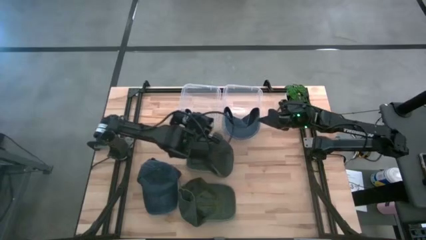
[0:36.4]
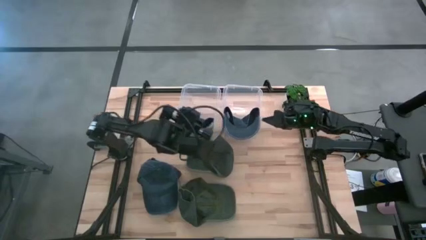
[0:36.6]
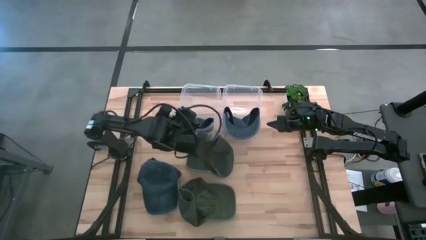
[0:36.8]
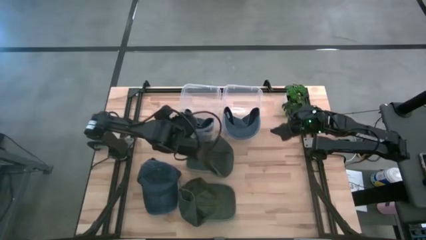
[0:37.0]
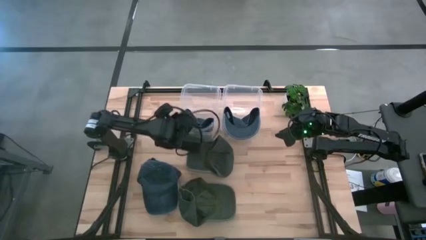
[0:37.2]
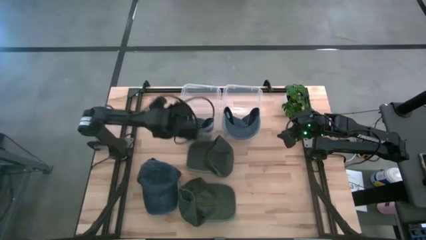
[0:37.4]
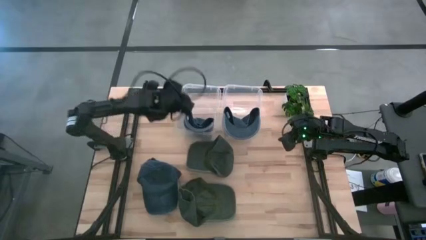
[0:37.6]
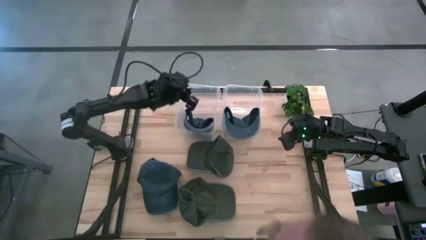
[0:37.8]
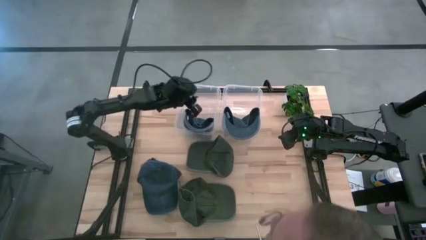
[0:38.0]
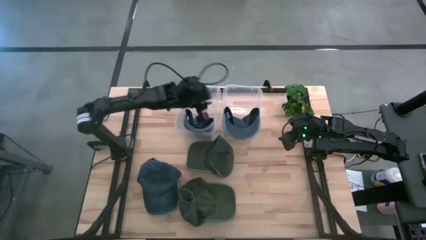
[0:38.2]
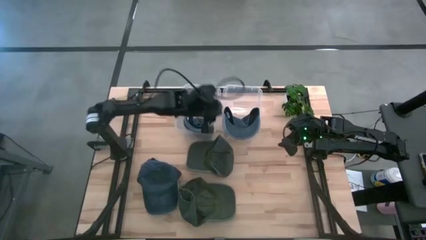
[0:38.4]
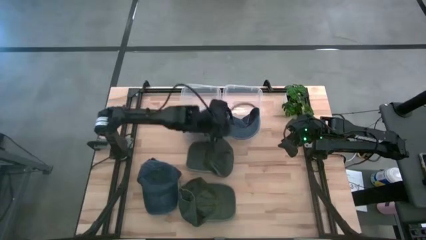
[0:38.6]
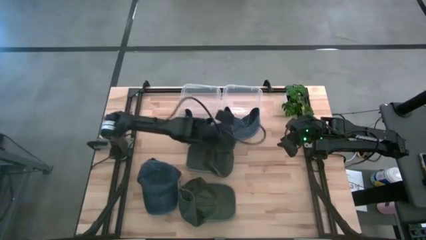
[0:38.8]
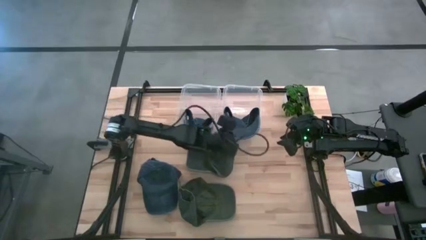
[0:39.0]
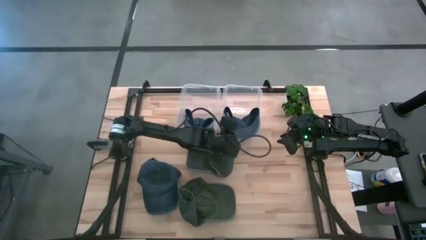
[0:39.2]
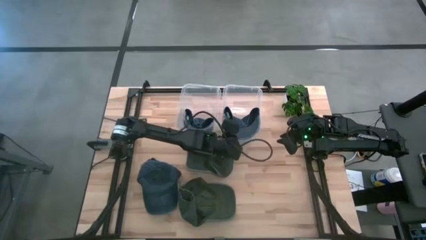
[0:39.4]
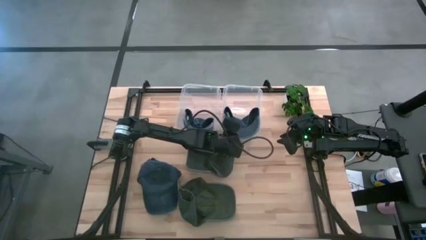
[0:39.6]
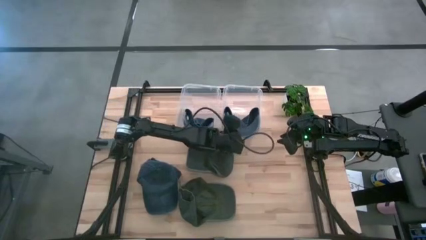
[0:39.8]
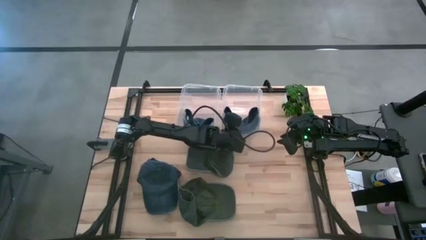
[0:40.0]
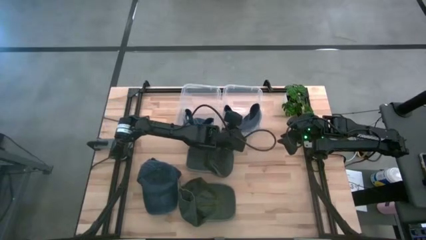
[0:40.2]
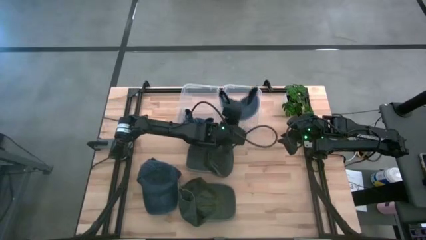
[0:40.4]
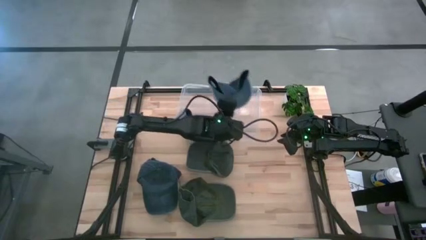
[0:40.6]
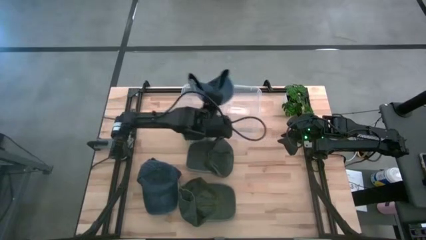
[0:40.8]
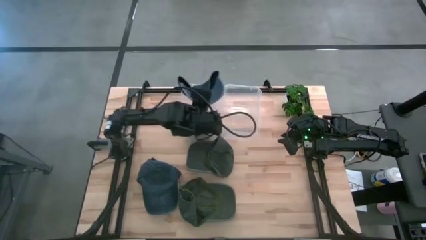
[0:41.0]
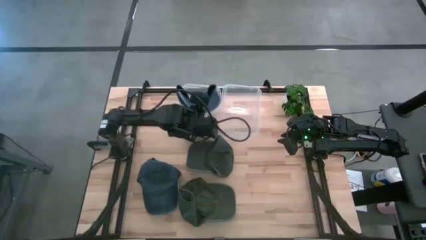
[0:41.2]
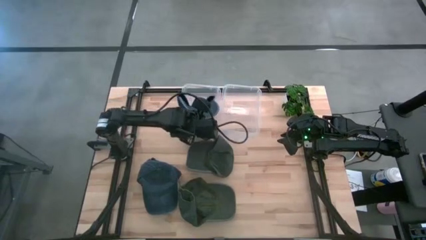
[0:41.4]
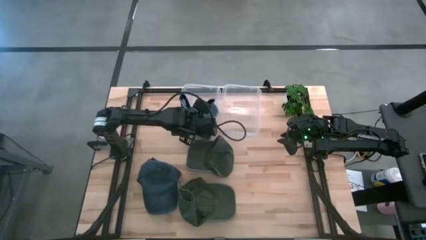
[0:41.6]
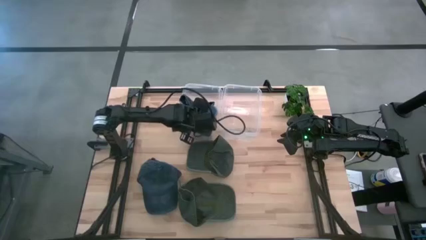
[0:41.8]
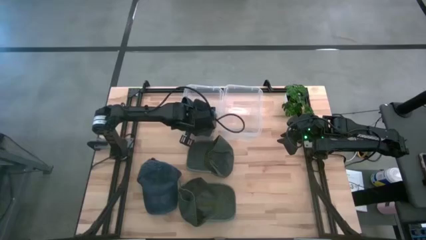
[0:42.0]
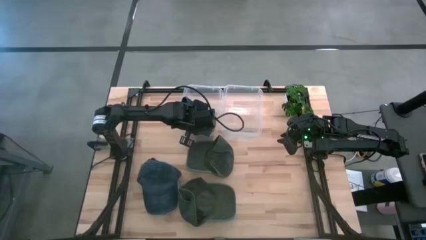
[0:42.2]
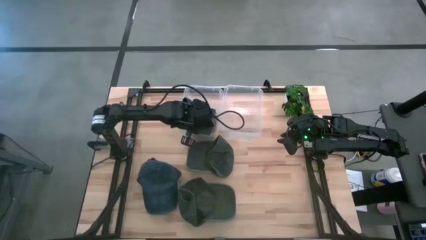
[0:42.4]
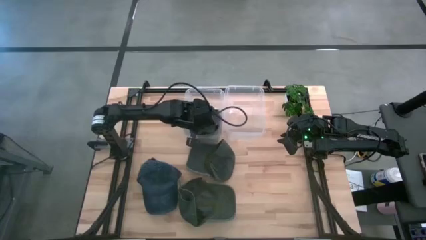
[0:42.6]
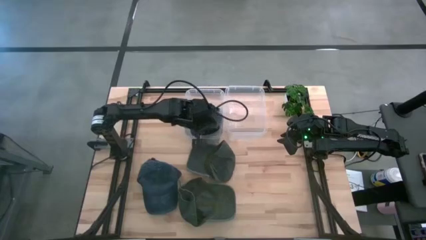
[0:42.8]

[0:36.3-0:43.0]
Task: Pick & Place hat
Put the right blue cap into the left transparent bin

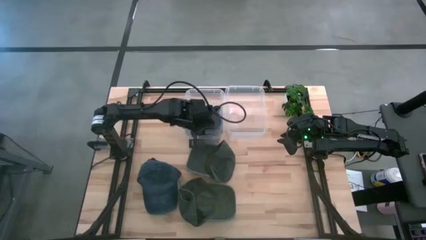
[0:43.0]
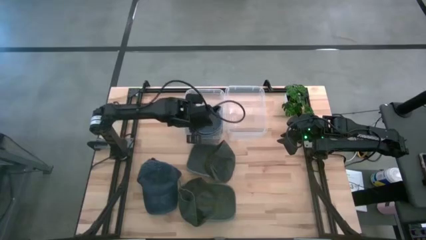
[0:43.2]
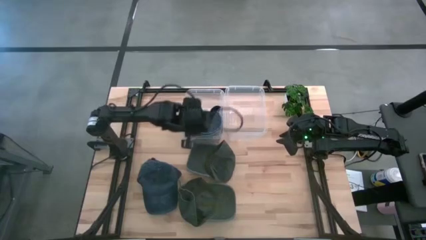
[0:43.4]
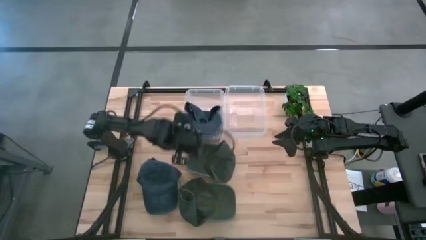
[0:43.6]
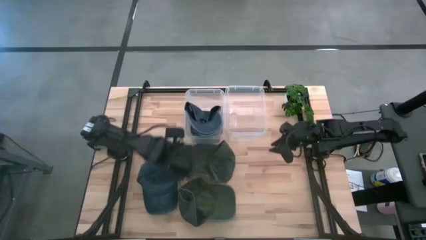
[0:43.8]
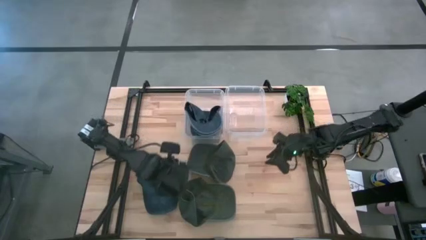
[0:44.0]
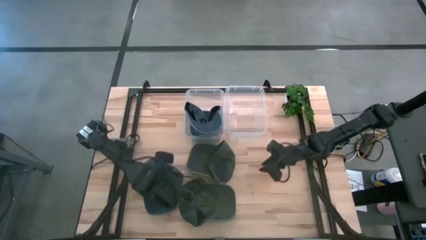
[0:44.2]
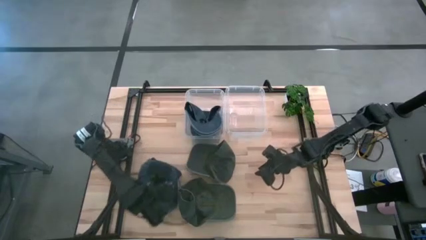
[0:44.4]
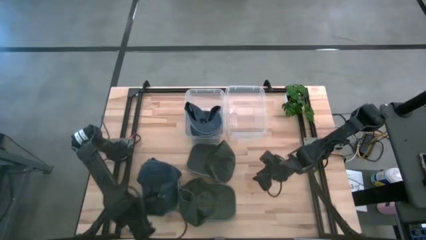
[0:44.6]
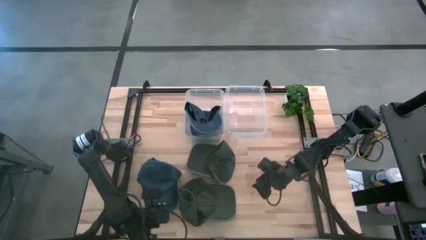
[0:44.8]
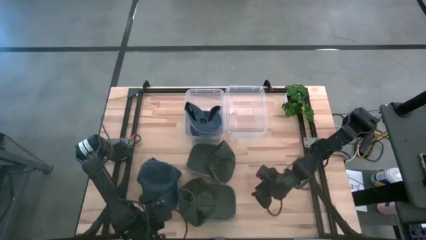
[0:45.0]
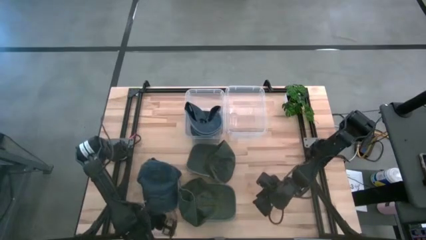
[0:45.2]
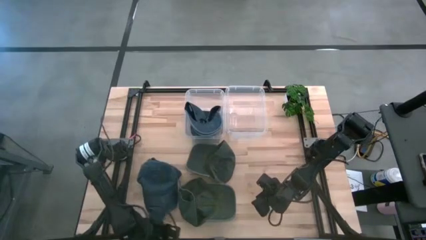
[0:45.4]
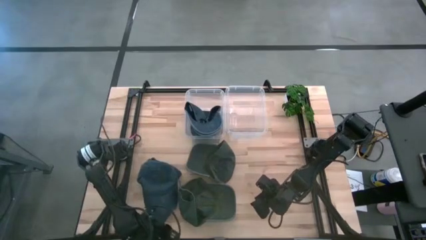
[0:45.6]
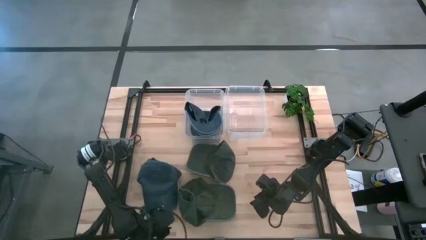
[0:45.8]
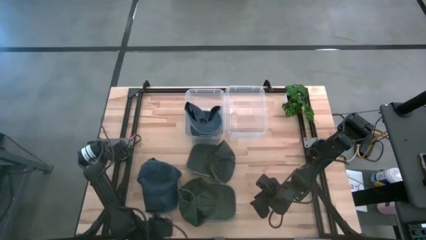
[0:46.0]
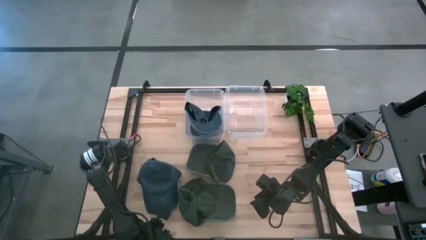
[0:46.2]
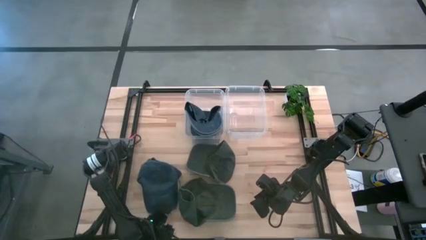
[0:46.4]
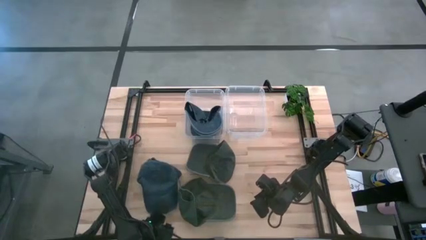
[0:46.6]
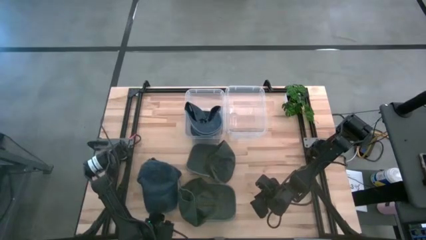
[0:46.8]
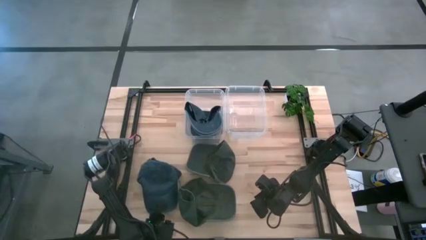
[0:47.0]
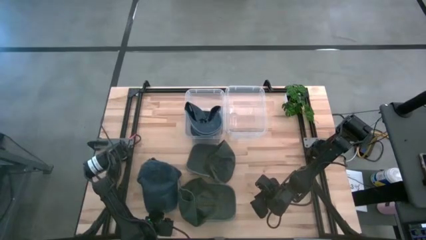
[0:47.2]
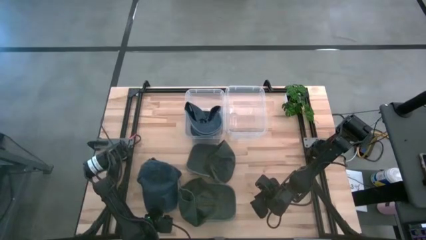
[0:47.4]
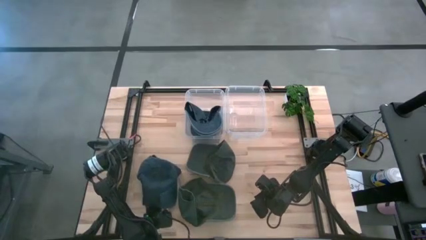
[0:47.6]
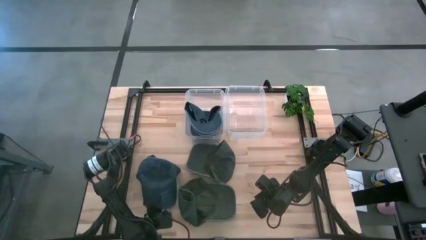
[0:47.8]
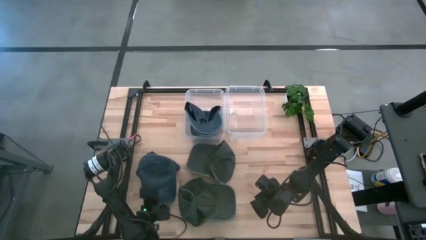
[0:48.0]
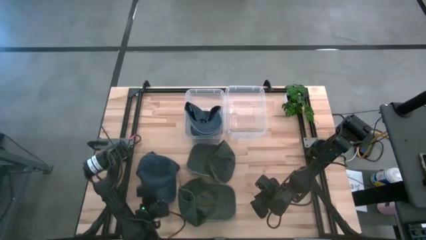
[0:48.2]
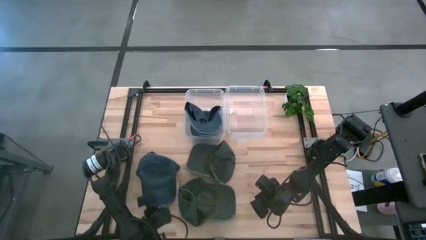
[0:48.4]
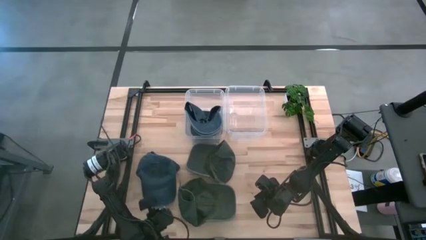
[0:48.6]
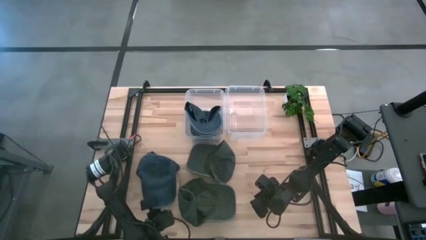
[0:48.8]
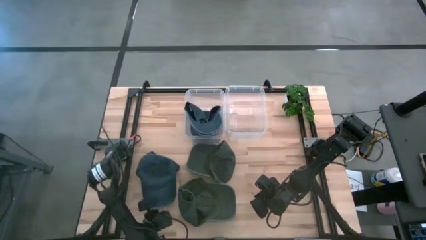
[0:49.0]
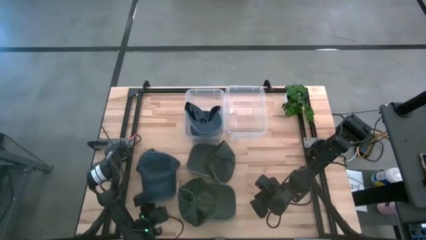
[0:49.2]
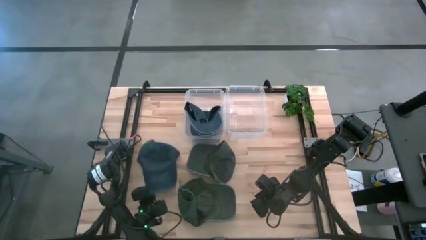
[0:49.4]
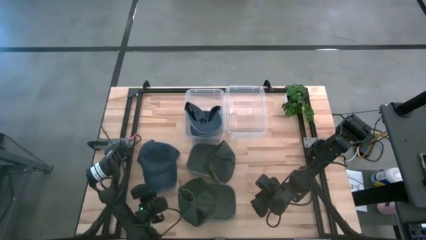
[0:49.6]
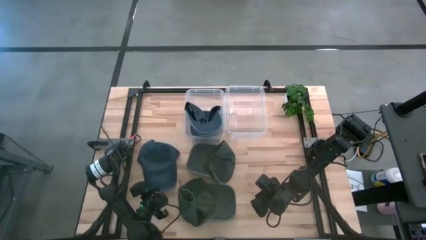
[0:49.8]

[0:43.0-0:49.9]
Put the blue cap into the left transparent bin

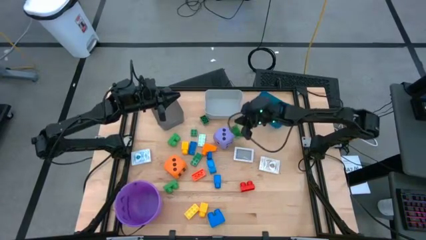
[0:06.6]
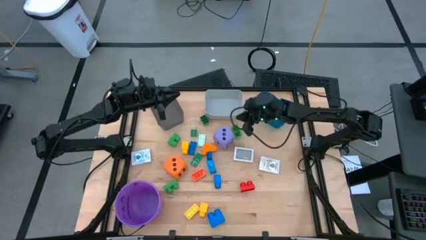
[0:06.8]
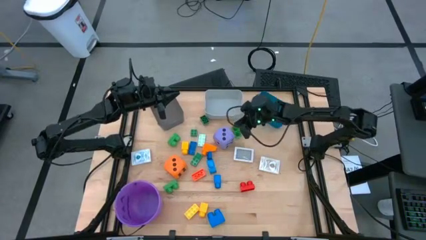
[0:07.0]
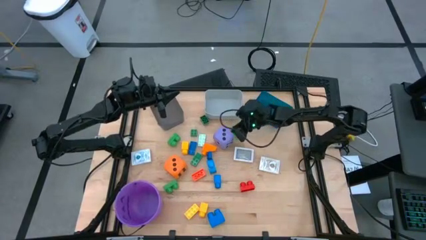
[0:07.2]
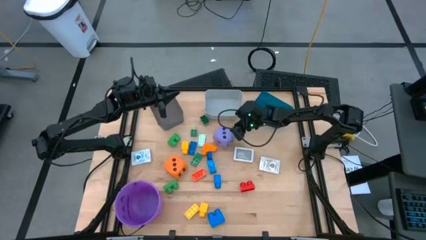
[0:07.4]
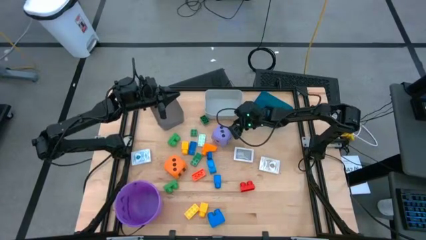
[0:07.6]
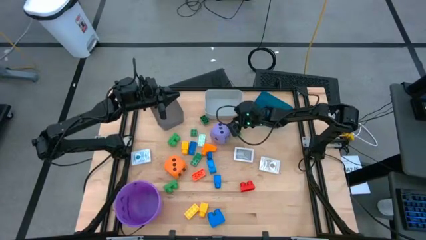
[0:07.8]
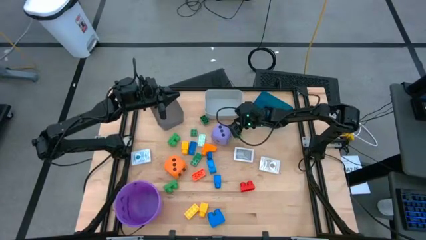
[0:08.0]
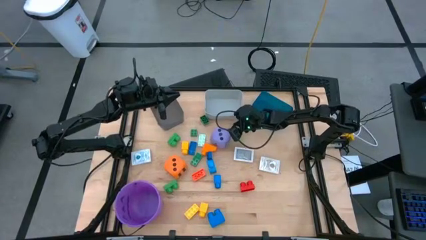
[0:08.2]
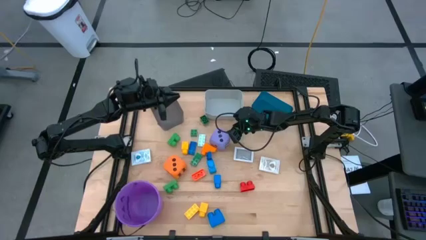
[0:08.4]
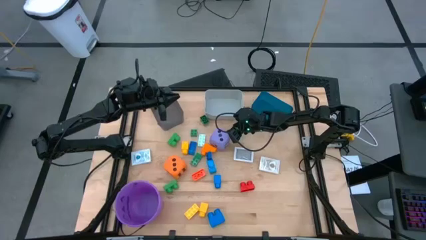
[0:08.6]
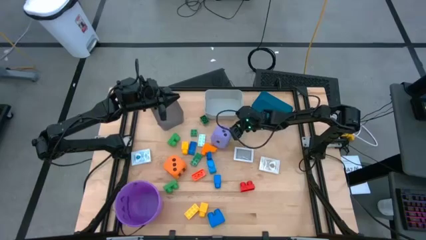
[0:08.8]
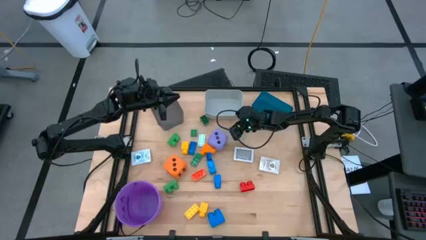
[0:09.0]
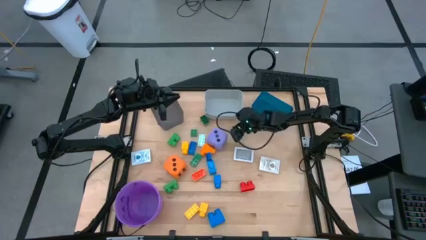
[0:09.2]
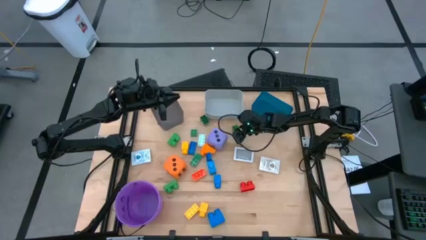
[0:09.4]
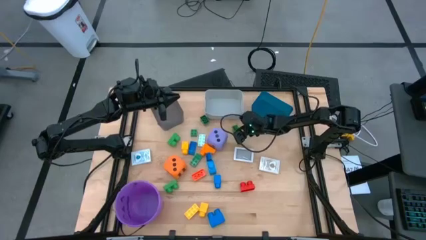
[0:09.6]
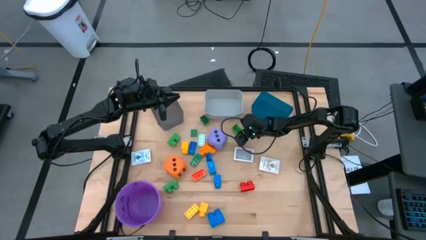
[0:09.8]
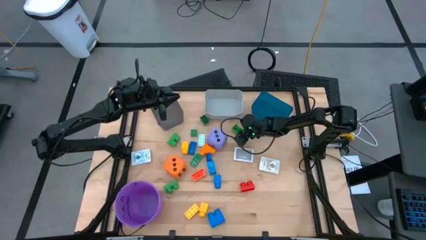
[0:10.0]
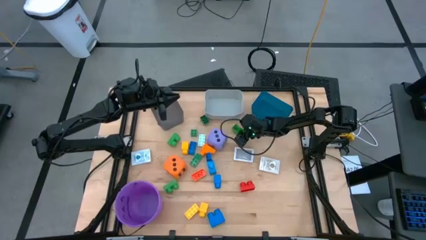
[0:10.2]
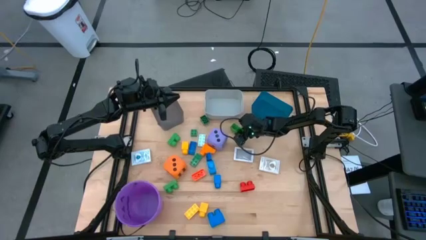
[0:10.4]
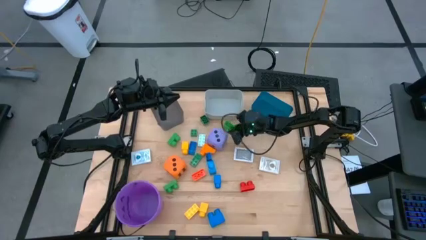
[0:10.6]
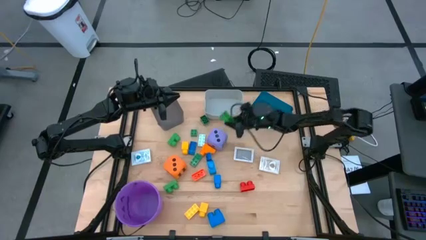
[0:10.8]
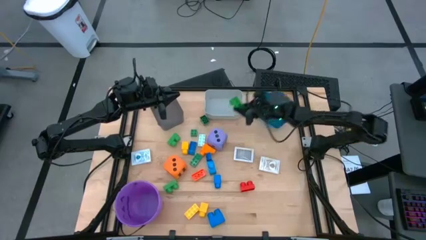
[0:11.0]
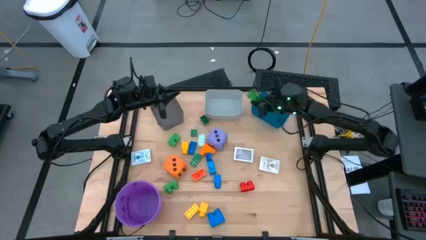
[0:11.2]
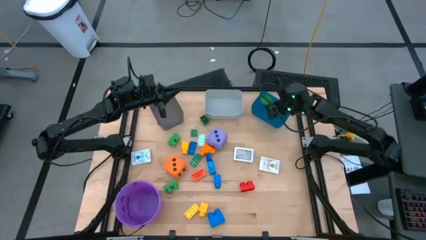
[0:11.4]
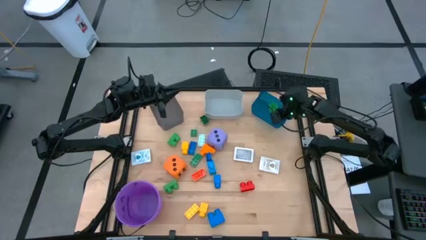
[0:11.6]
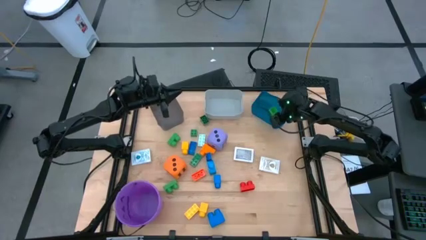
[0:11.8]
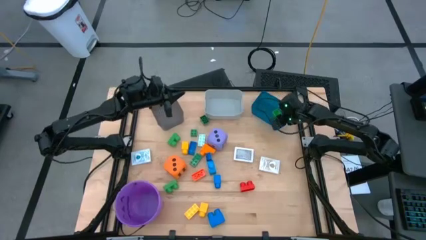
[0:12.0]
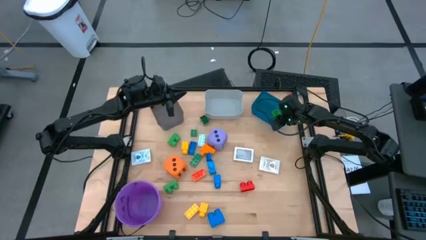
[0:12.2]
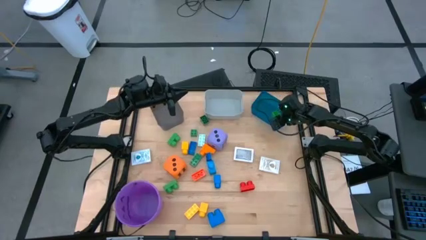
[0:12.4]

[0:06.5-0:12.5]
Task: Pick & Place Toys
Put the green game piece into the blue bin
